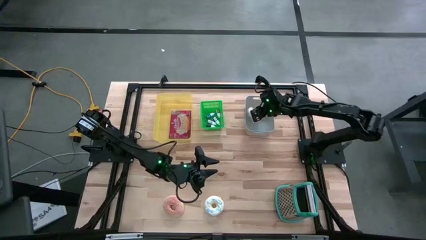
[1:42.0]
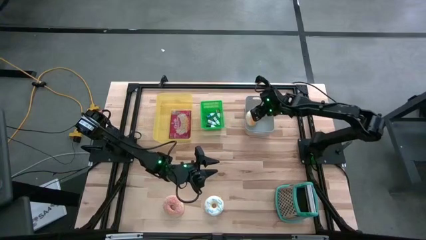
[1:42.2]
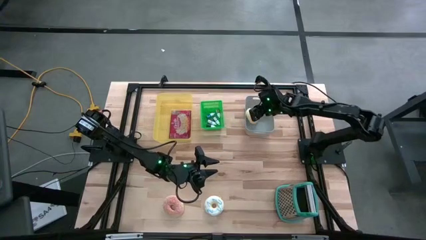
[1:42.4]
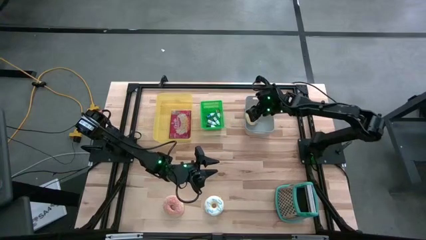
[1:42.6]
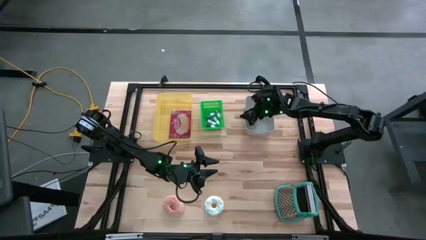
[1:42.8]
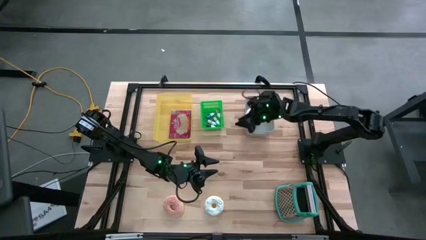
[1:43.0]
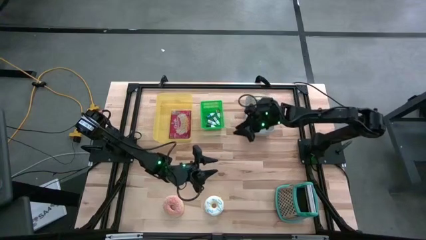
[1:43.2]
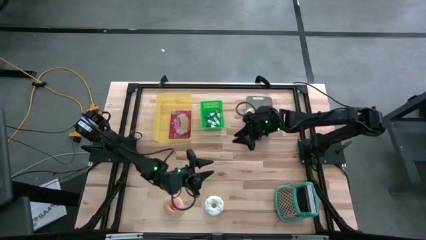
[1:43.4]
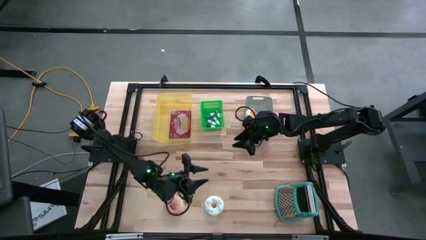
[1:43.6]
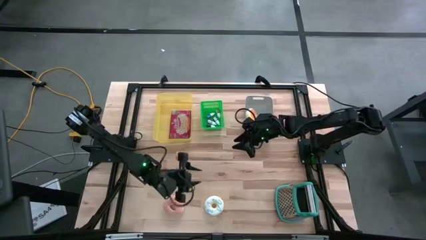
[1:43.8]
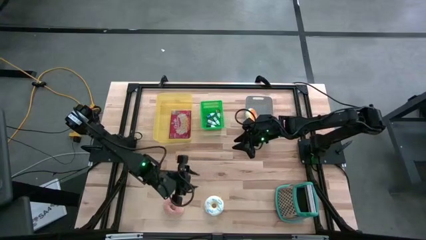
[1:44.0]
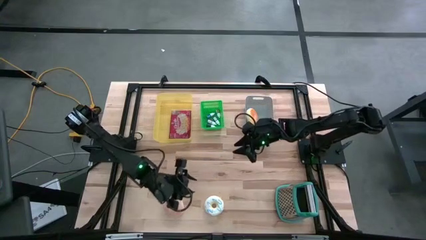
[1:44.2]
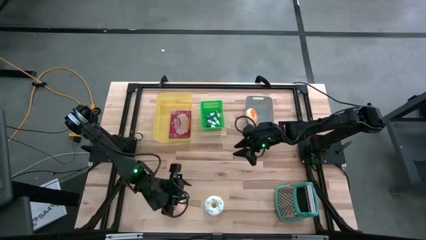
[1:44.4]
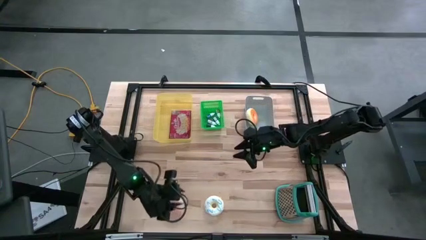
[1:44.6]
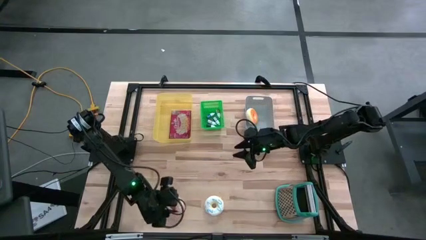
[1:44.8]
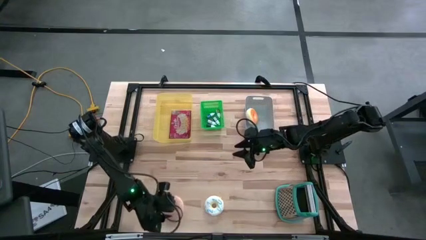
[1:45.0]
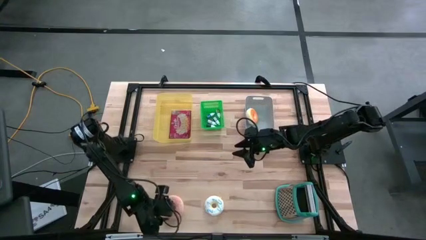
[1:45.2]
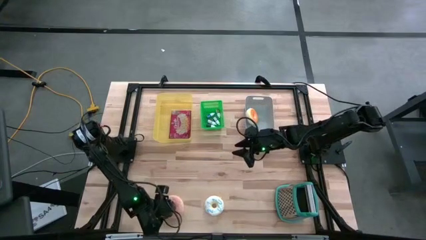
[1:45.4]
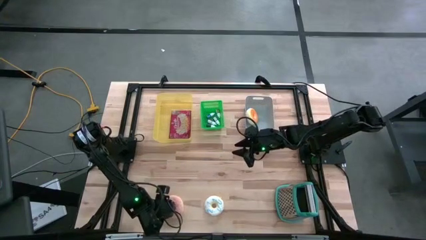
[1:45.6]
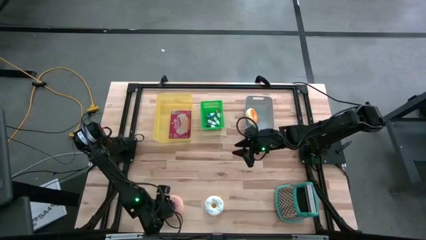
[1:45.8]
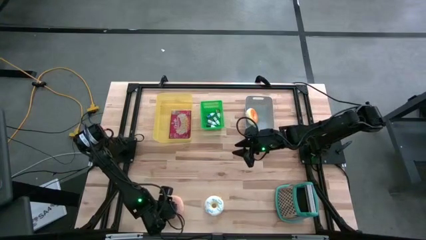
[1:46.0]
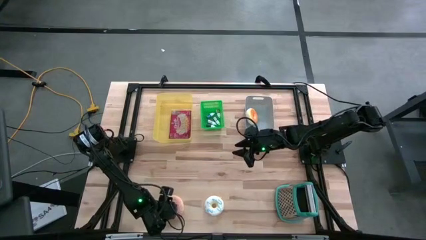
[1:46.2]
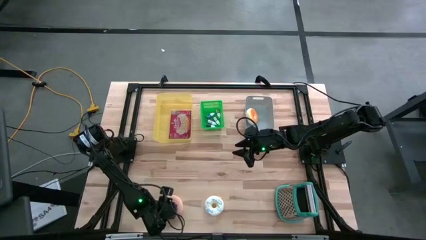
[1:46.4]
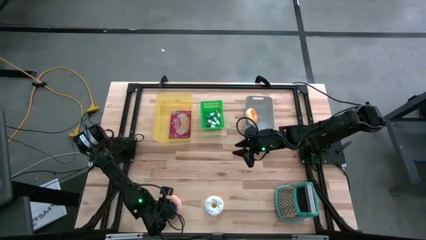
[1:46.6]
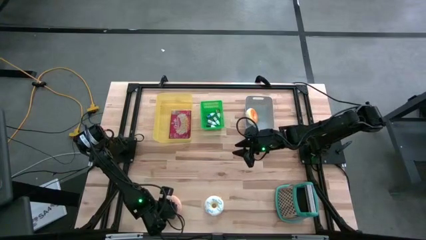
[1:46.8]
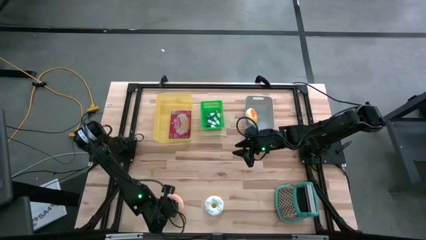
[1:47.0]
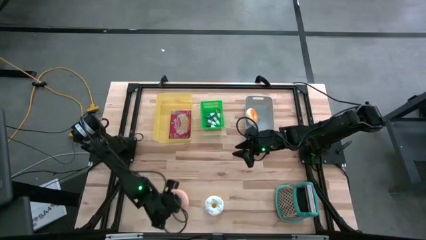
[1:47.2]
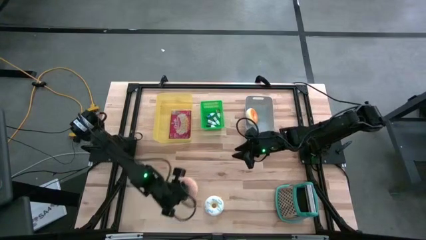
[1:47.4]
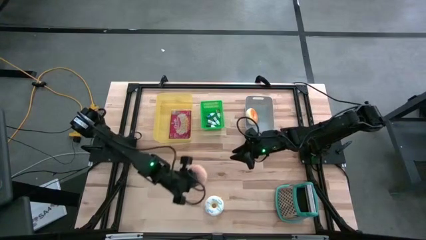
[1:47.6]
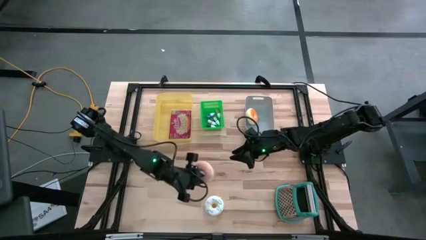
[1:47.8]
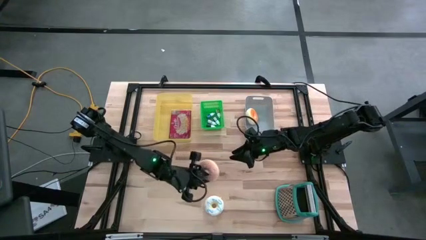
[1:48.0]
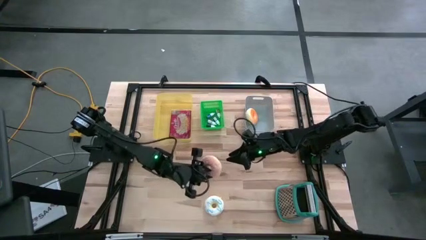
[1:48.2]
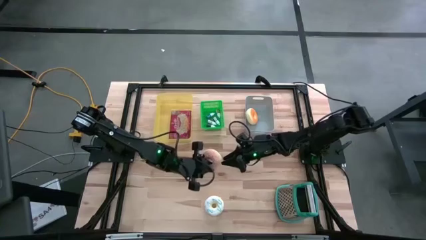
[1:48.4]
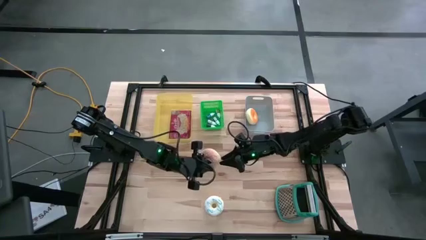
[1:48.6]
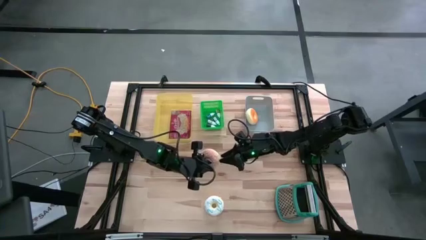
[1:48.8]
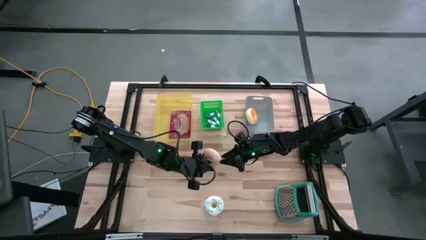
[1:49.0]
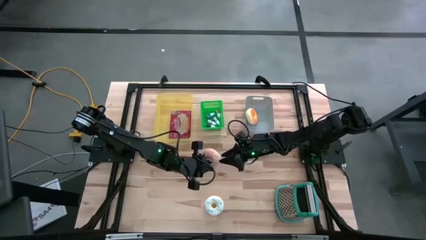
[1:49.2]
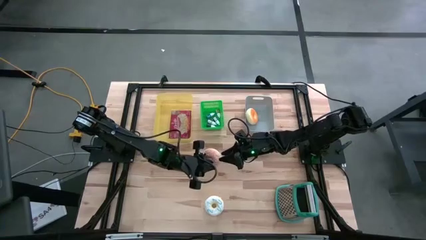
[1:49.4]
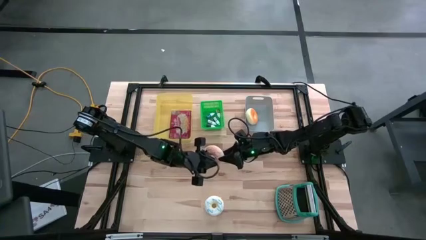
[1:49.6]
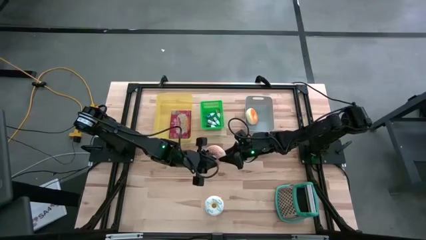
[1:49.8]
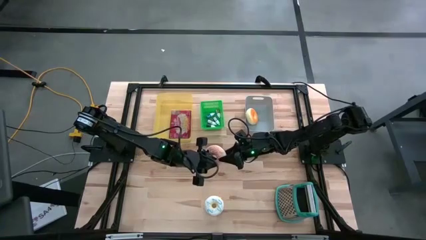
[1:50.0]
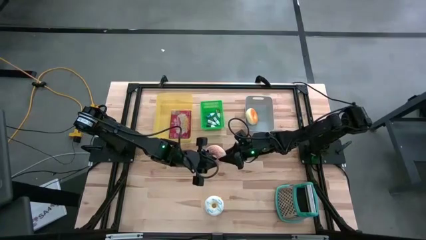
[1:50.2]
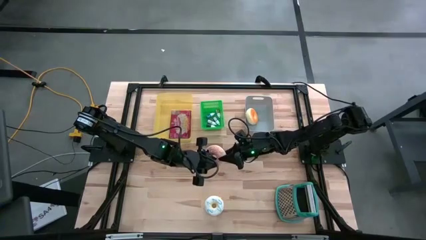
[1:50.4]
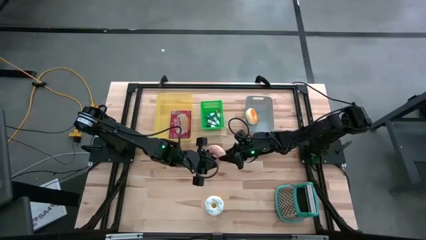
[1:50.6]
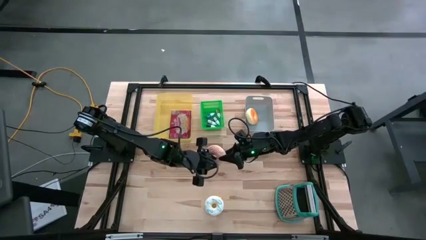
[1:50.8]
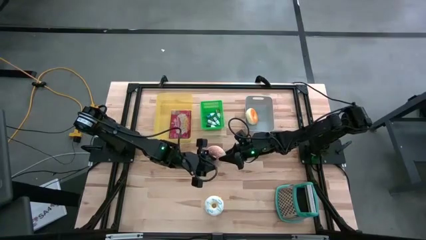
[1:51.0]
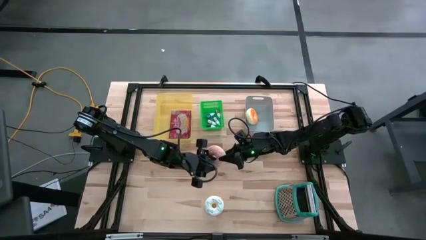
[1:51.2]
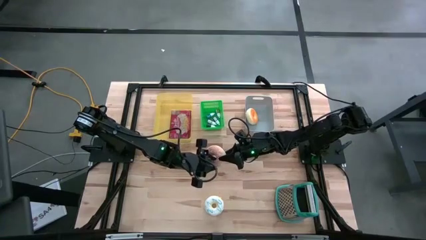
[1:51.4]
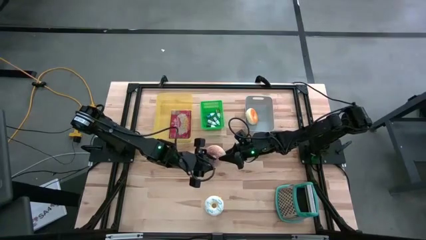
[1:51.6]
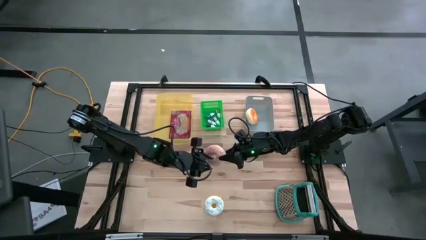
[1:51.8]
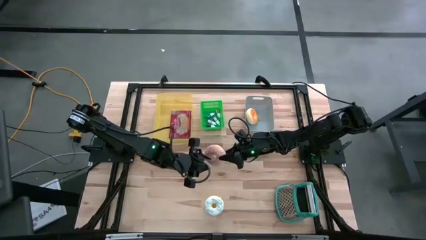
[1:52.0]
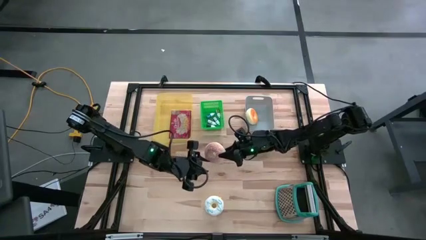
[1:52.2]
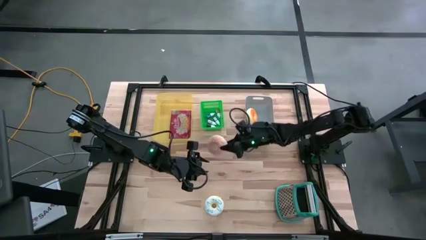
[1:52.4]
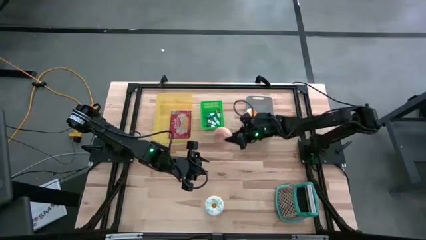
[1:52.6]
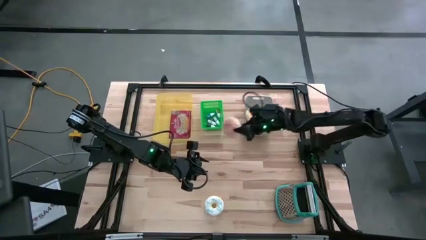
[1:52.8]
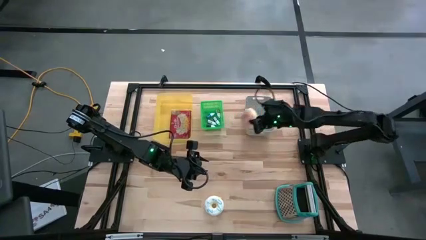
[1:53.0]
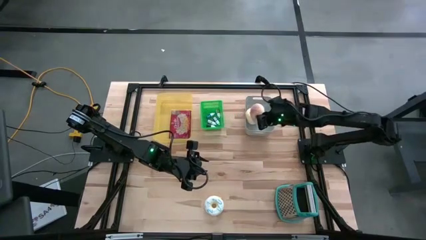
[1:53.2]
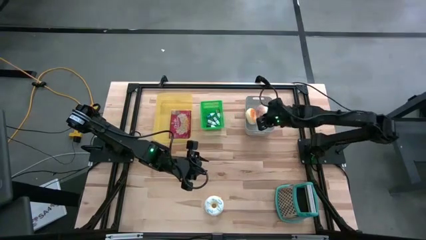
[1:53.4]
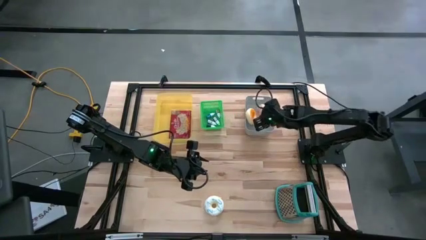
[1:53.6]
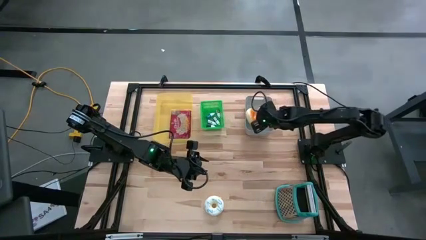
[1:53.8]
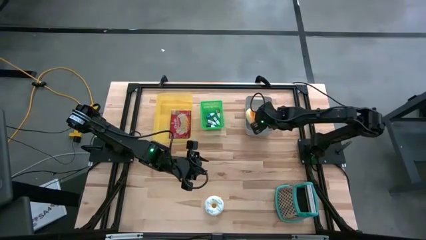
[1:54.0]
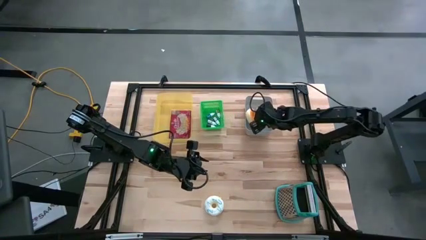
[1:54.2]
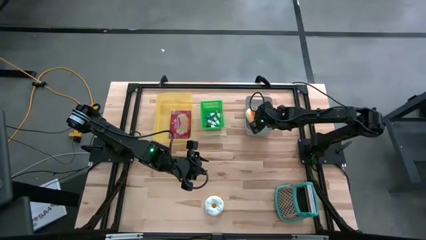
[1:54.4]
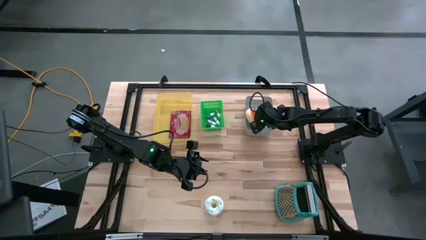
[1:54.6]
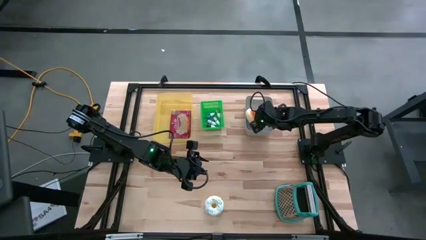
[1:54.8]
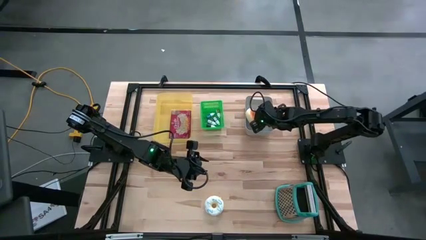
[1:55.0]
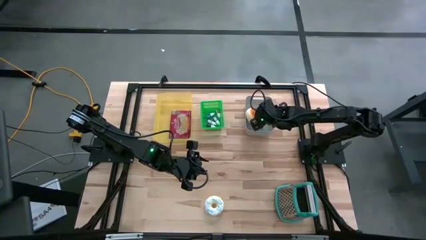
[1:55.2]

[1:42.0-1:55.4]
Put the brown donut into the gray bin
